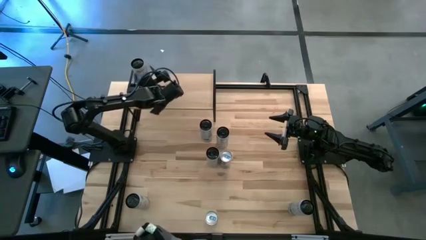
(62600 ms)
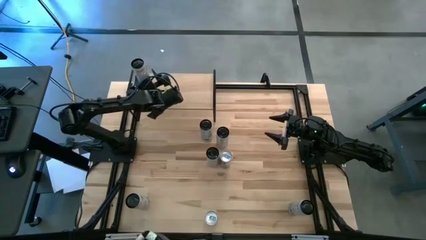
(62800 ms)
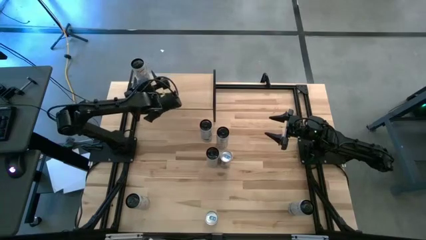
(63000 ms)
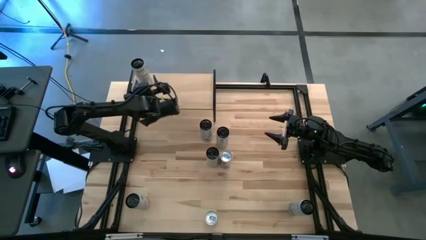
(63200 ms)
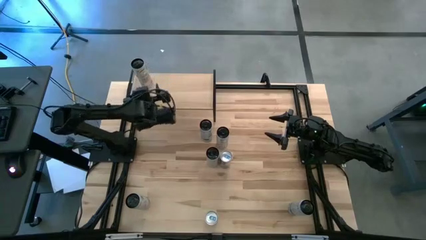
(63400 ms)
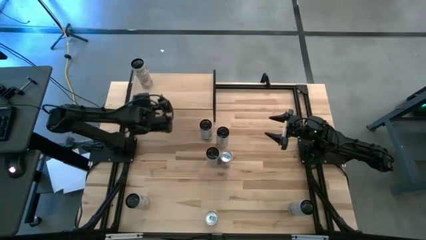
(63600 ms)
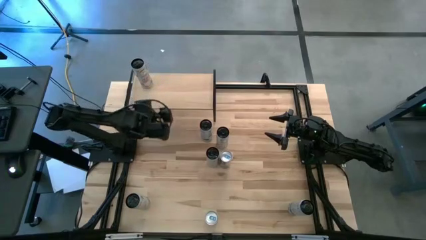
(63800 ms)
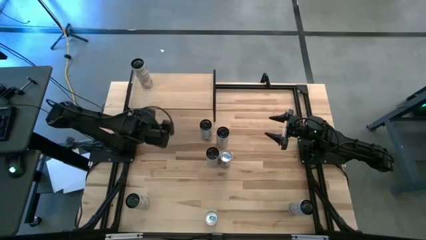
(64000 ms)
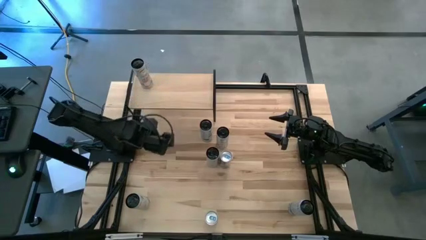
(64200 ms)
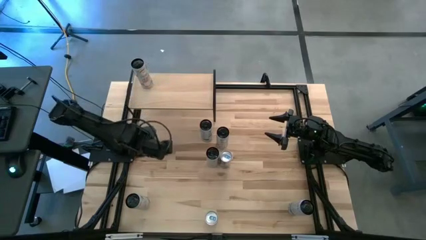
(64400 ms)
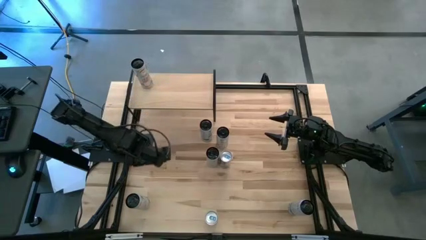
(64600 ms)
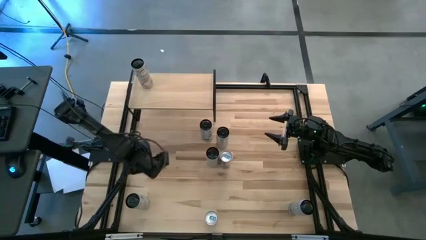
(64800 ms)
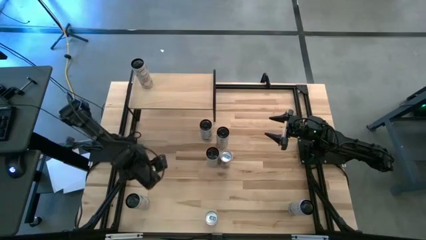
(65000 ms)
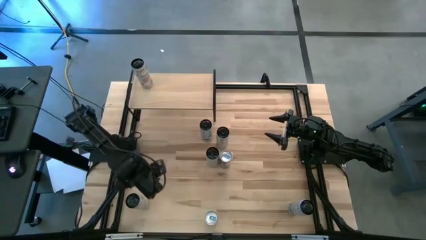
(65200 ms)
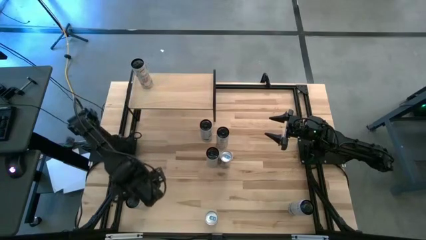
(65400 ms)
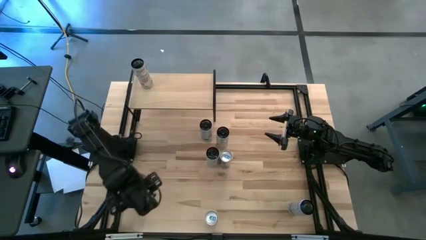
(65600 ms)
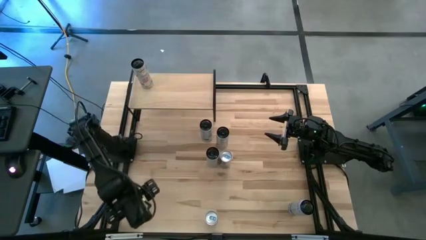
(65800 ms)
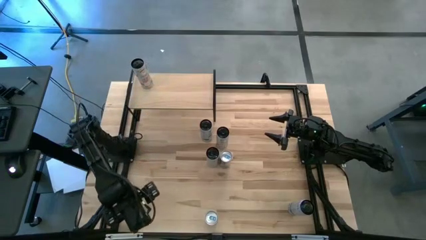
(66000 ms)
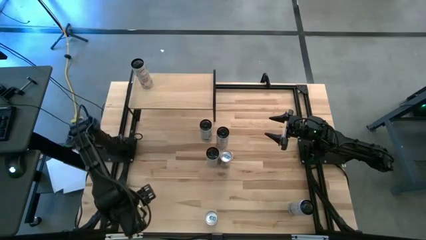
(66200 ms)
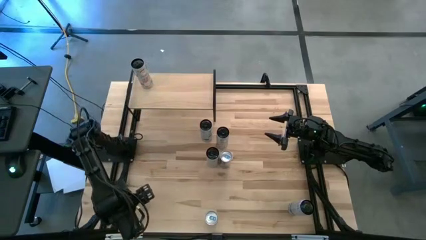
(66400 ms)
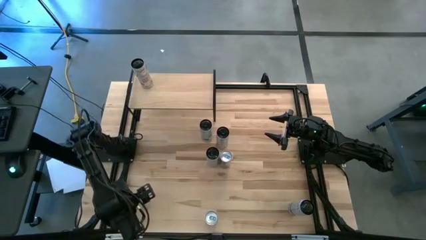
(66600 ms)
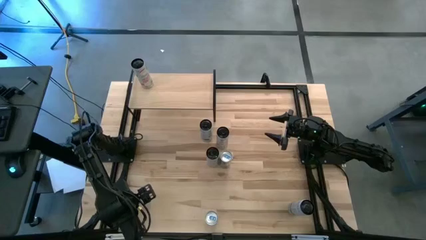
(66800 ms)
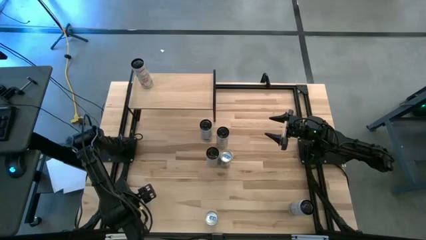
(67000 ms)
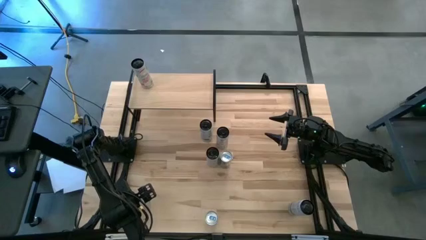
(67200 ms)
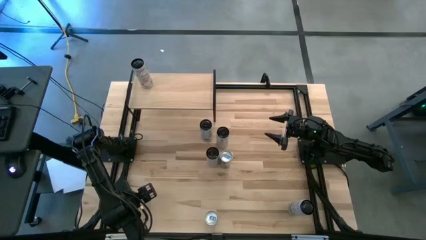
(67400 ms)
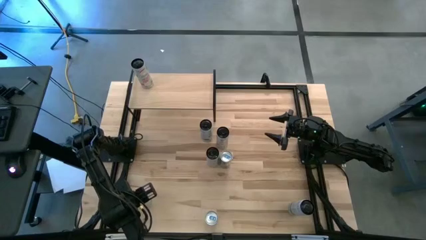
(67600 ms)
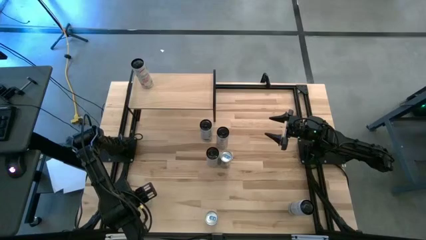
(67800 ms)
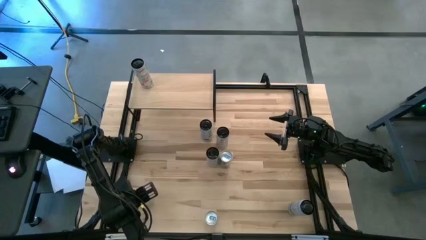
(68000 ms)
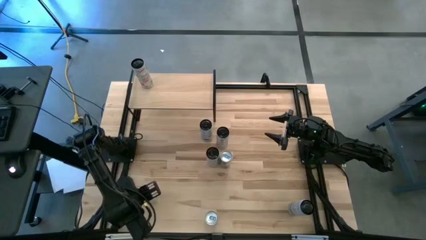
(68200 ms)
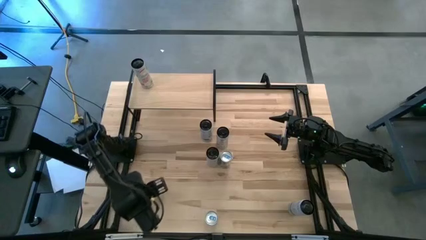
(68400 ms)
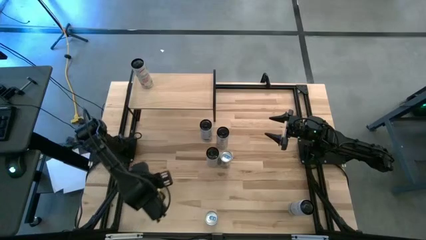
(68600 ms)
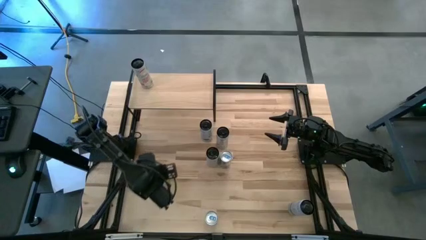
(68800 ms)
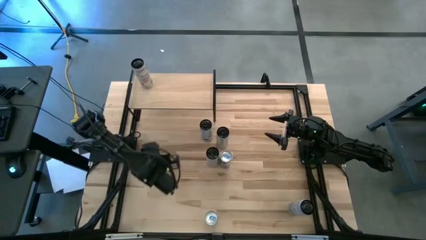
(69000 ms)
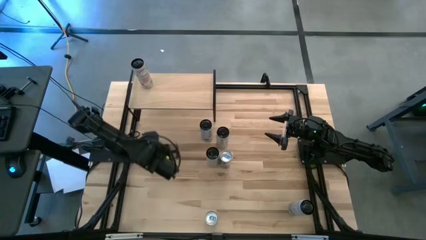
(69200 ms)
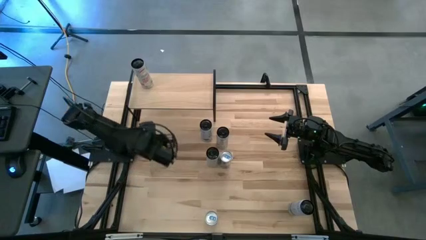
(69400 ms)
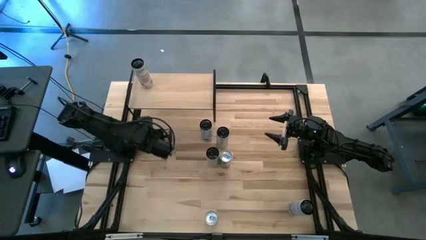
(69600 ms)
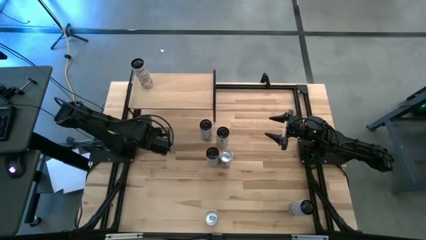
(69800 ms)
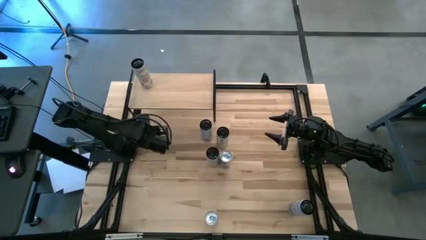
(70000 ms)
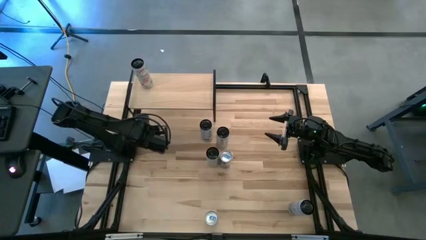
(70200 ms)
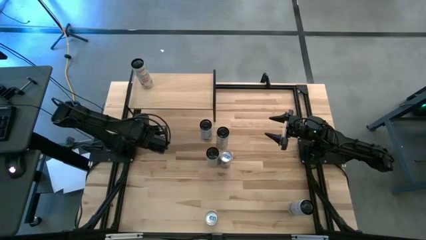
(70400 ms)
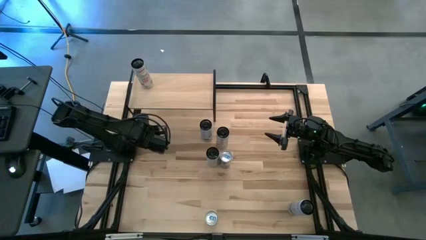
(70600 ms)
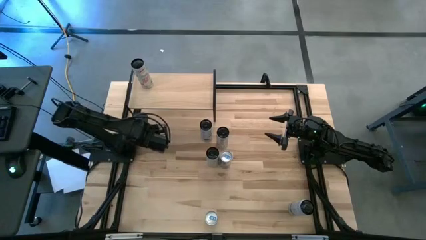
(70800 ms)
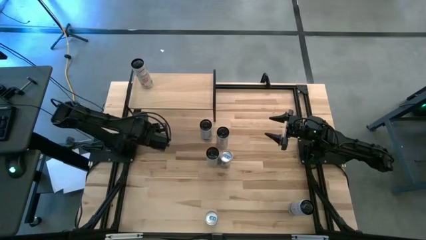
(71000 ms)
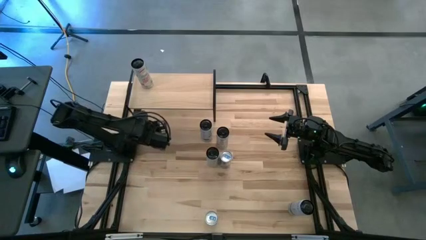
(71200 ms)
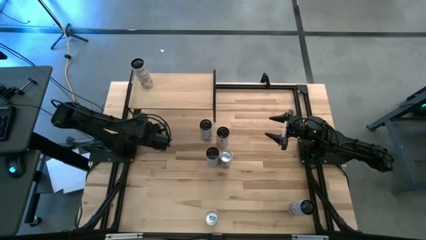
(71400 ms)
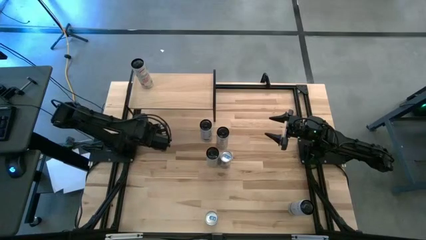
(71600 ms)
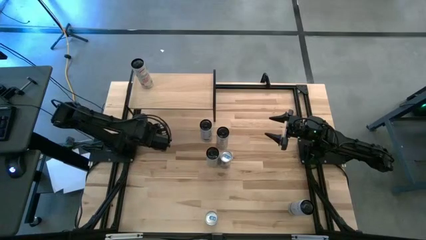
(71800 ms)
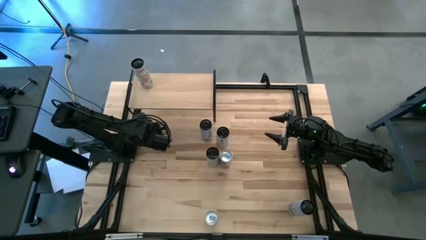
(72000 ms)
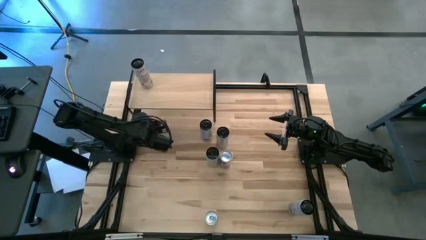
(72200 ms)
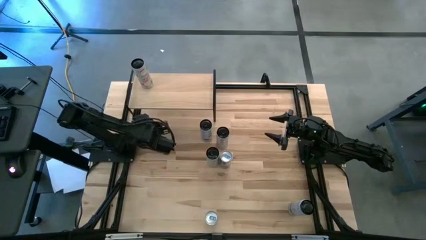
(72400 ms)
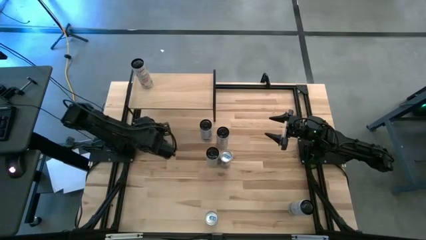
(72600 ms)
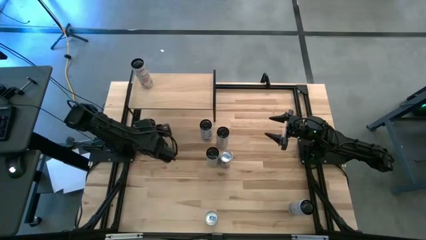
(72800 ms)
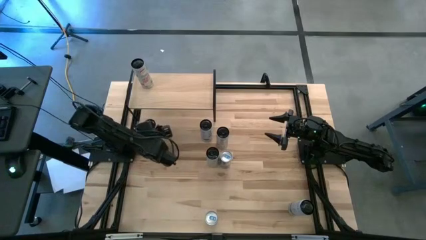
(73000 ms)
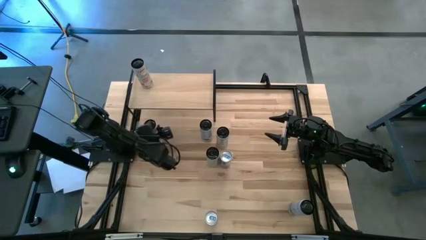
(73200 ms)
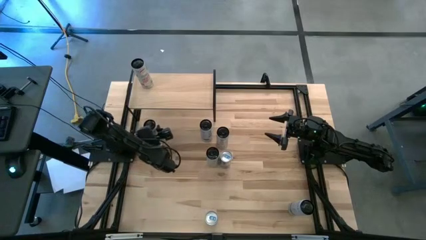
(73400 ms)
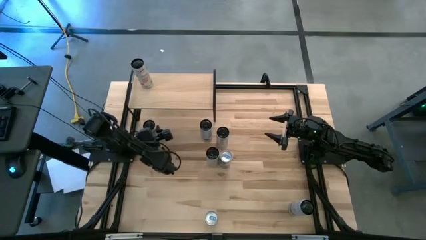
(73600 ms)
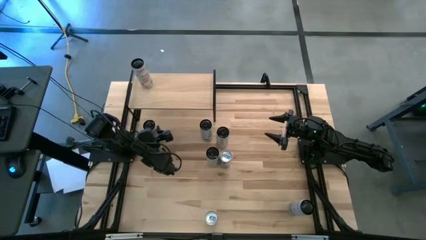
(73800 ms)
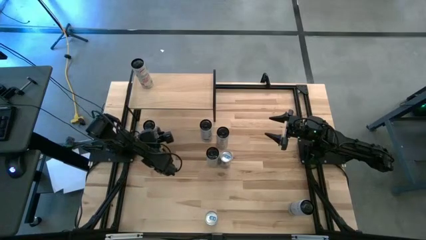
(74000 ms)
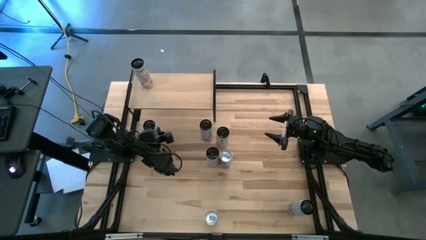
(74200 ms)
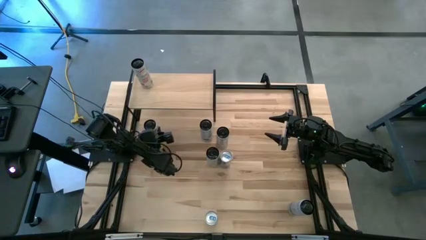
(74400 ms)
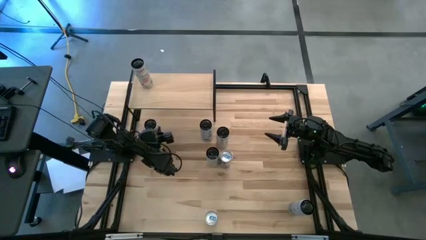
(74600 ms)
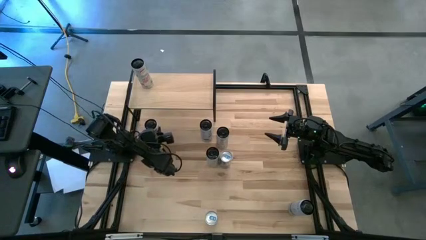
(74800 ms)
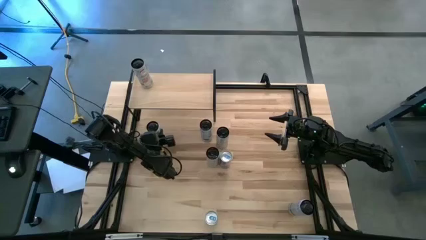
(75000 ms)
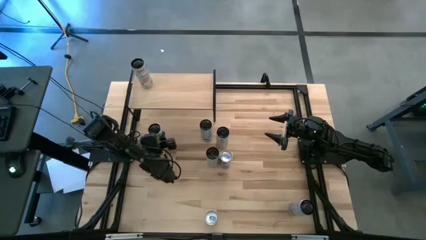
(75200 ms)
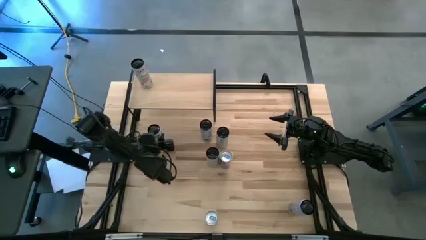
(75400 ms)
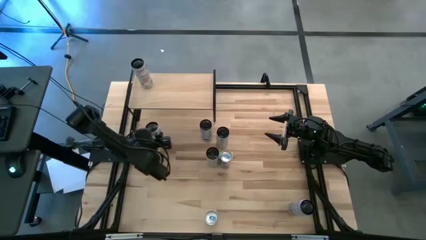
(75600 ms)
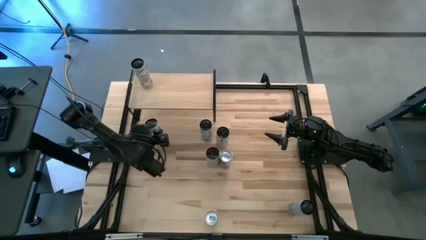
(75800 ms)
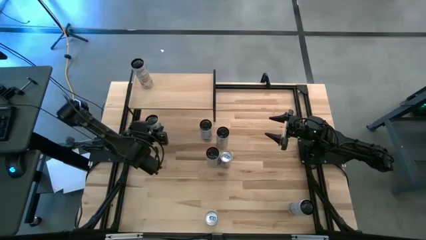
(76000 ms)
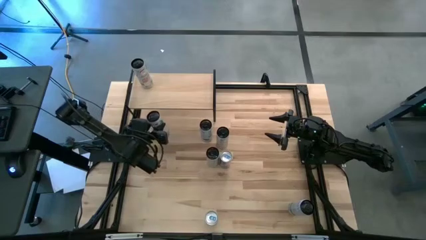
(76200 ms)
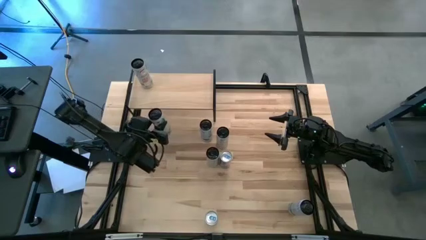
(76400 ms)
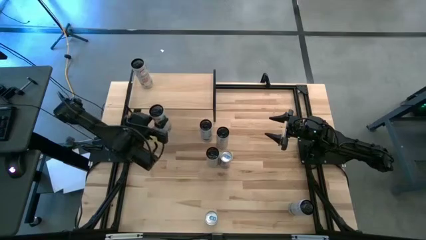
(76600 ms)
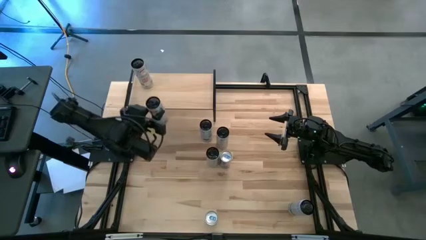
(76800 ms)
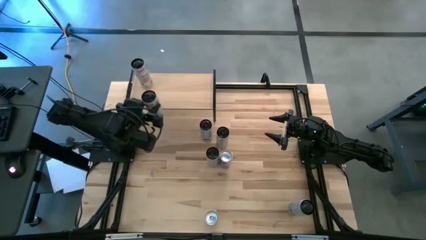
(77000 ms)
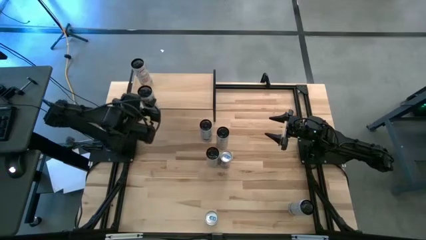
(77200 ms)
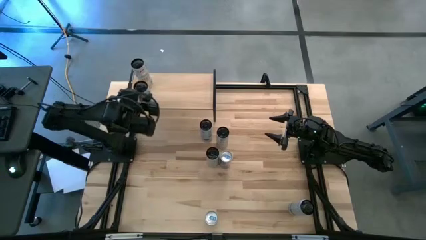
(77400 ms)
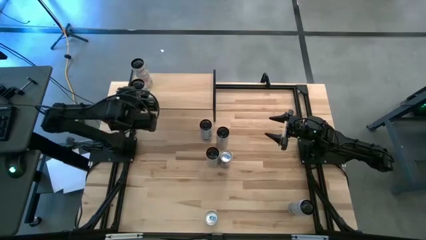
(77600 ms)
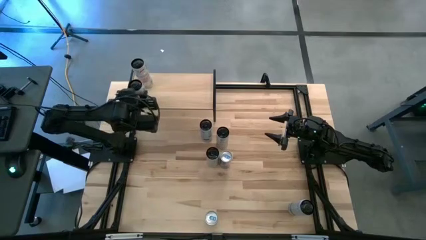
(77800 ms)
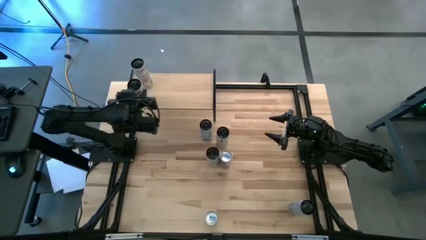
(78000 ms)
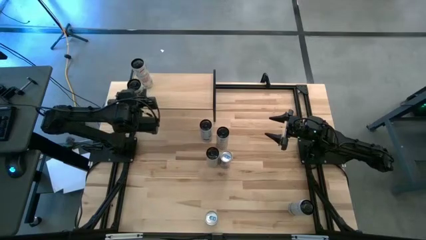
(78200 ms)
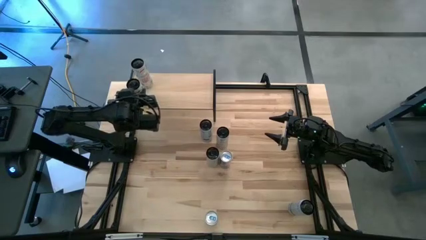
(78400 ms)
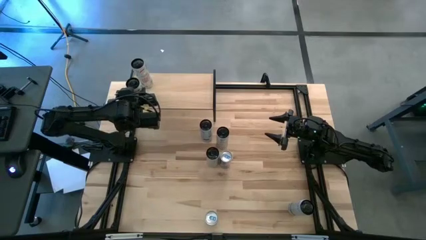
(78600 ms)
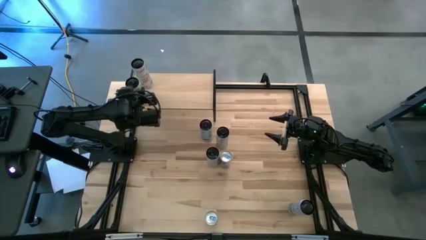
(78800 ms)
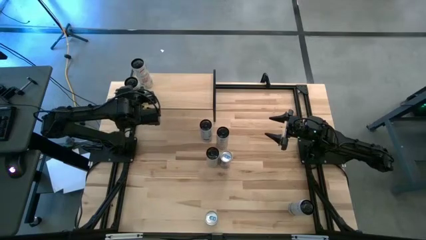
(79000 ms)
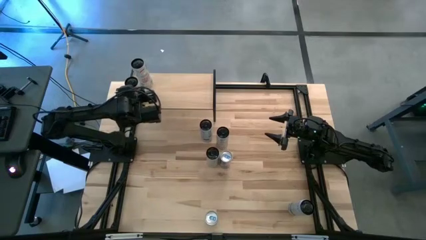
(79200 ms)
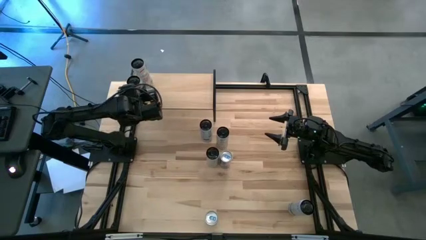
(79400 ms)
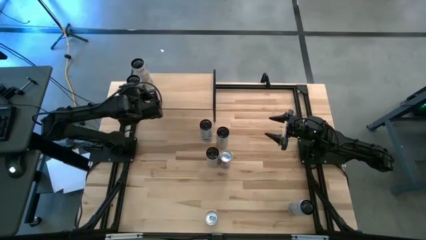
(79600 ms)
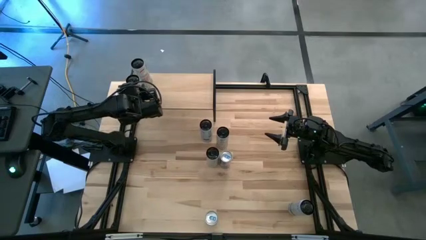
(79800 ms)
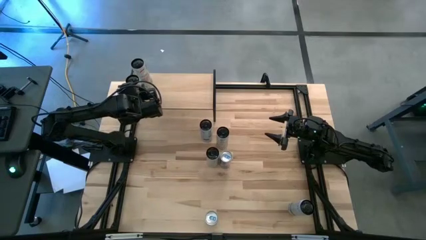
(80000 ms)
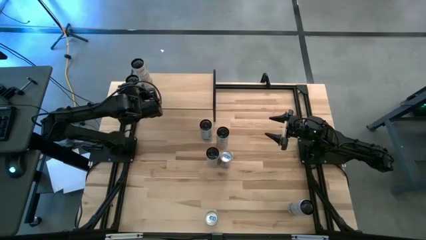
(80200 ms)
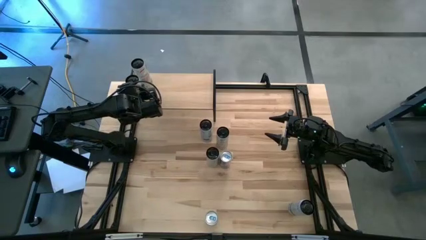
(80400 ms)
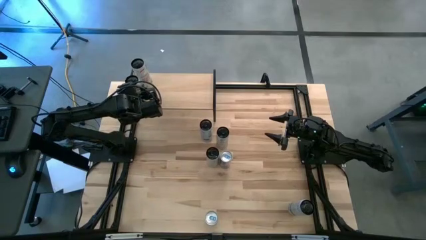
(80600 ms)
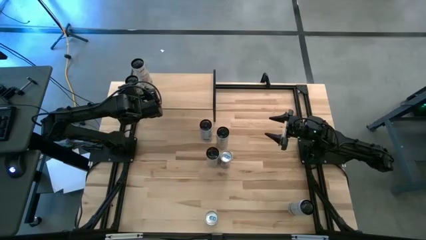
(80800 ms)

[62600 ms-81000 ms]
Task: Place canned beverage on shelf
Put the white pink soda can on the shelf aligned with the other white pink soda can
